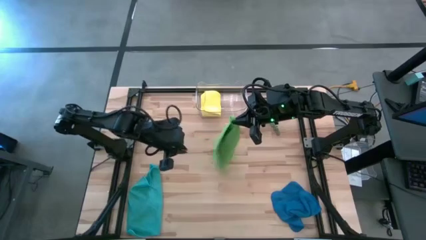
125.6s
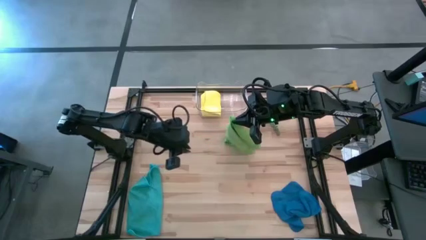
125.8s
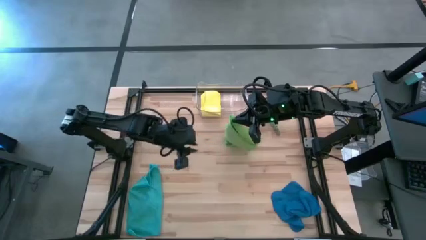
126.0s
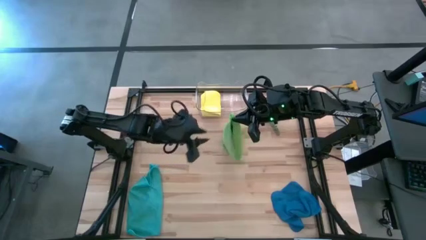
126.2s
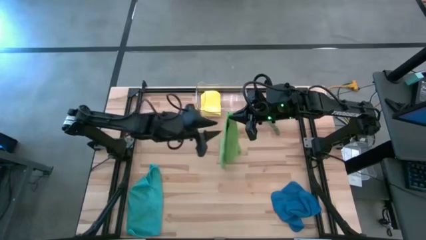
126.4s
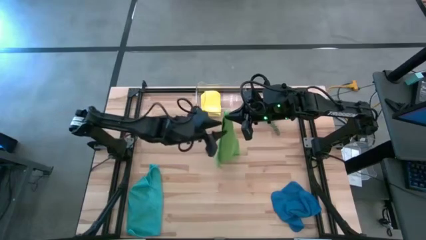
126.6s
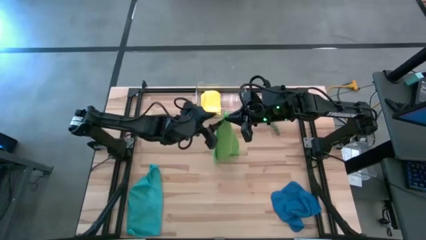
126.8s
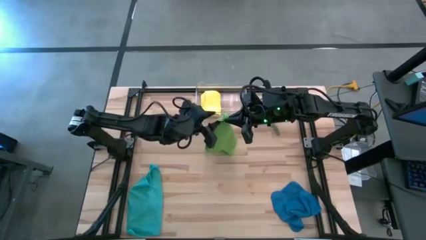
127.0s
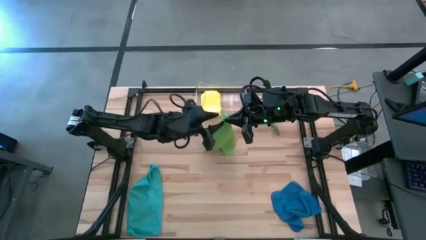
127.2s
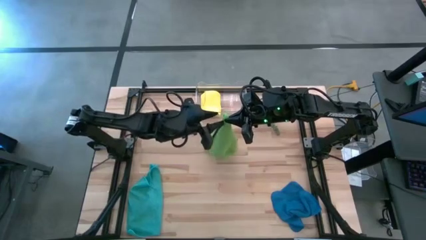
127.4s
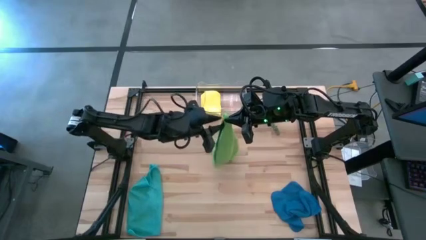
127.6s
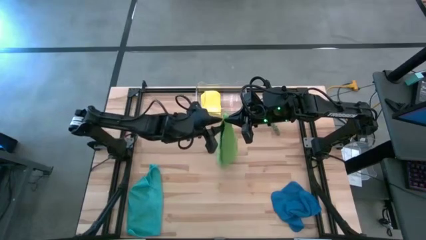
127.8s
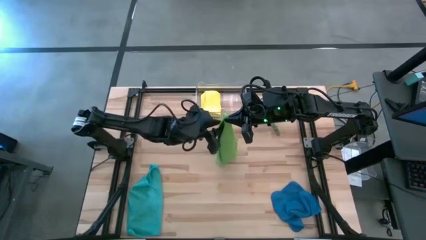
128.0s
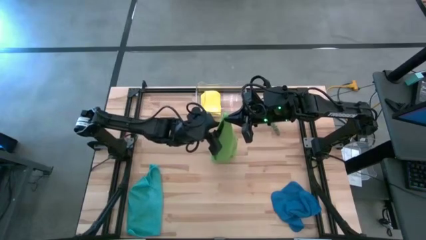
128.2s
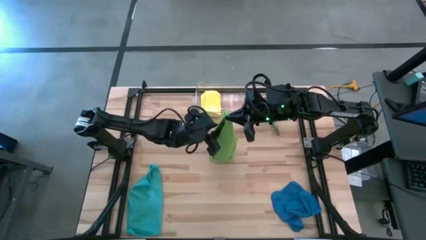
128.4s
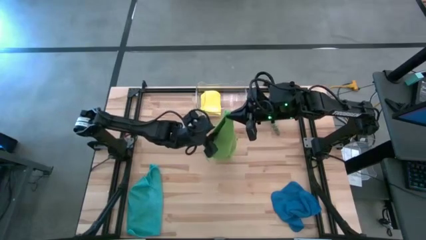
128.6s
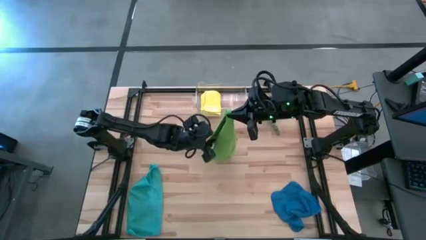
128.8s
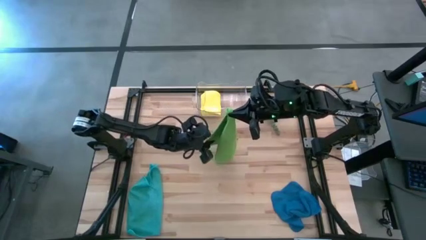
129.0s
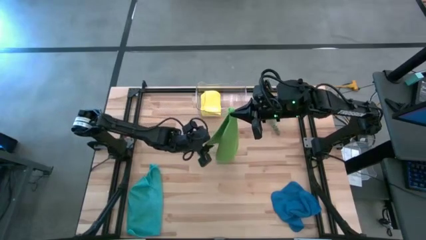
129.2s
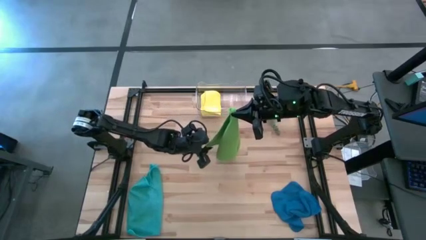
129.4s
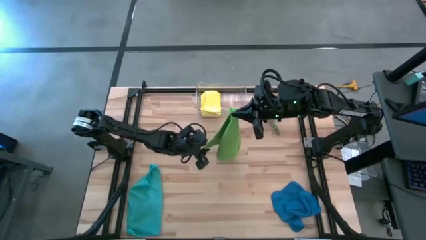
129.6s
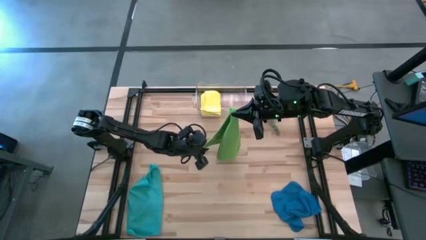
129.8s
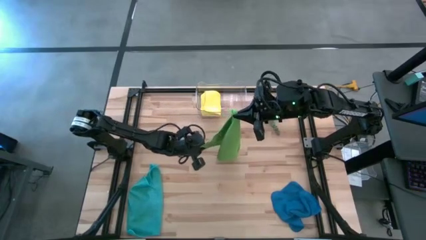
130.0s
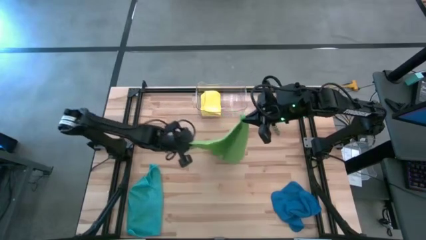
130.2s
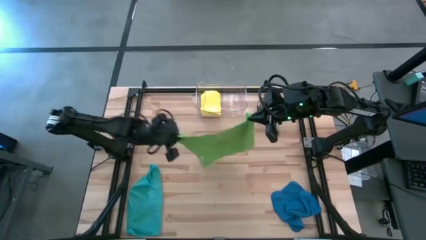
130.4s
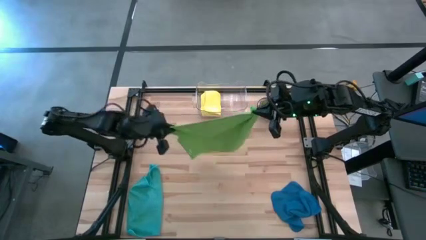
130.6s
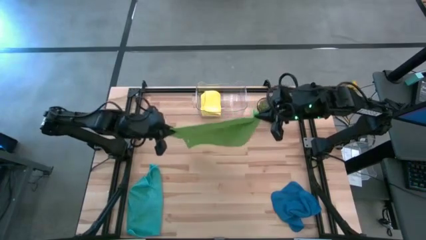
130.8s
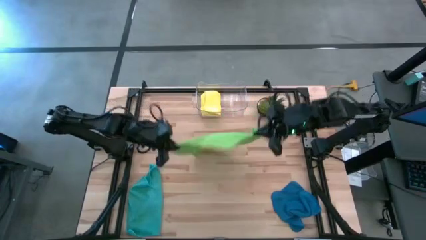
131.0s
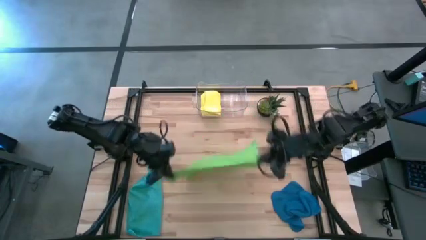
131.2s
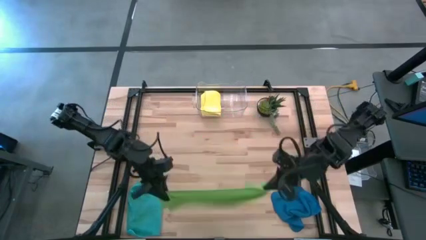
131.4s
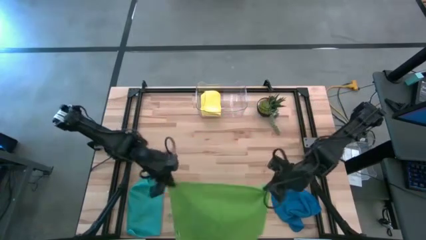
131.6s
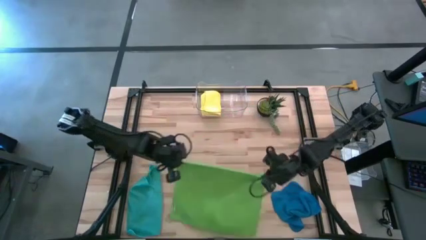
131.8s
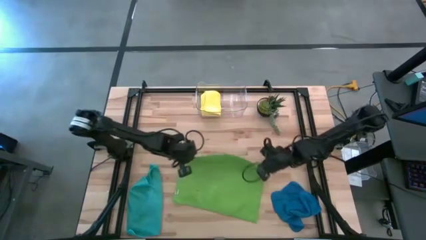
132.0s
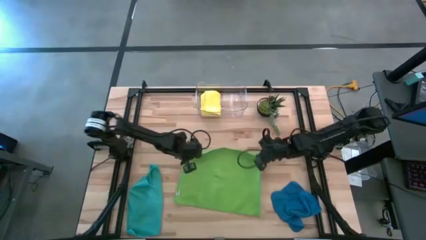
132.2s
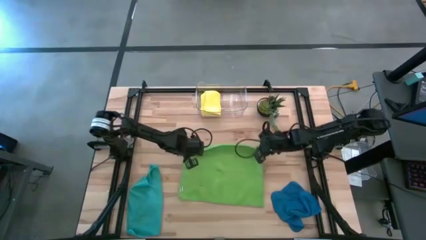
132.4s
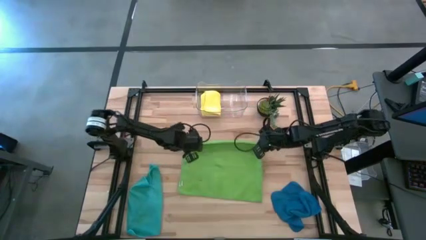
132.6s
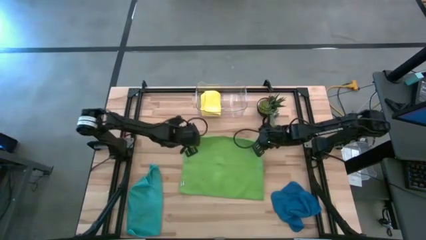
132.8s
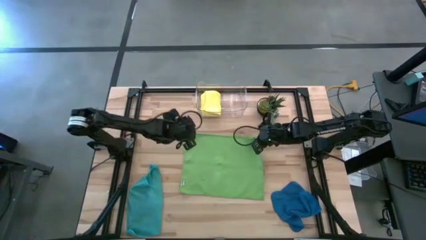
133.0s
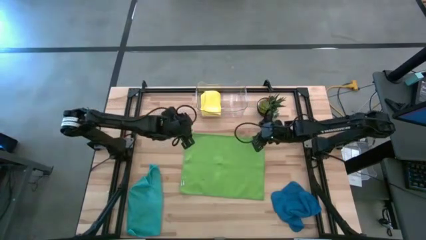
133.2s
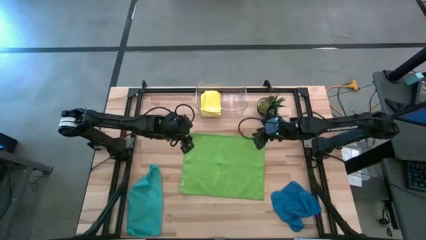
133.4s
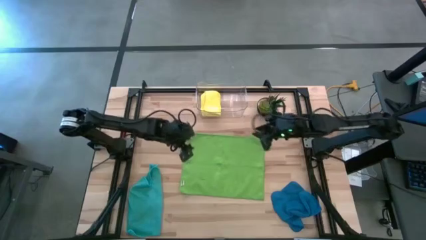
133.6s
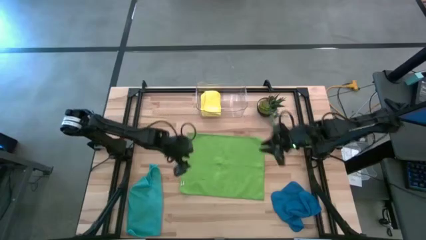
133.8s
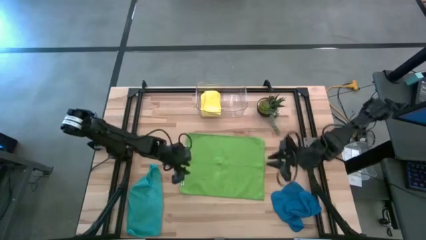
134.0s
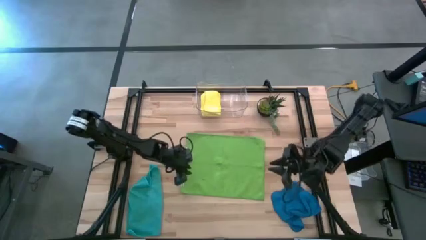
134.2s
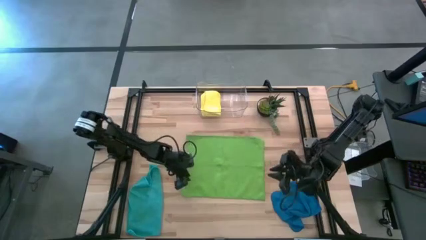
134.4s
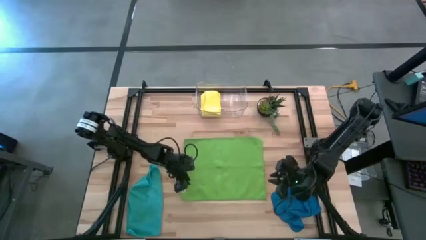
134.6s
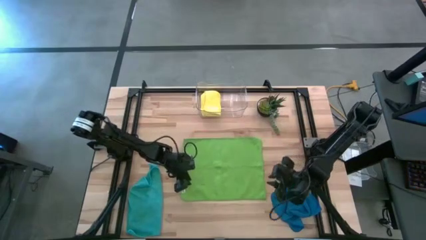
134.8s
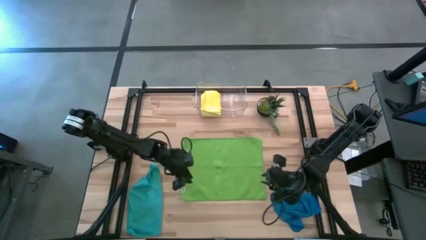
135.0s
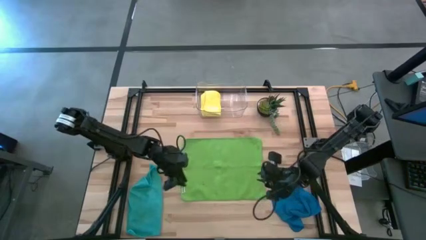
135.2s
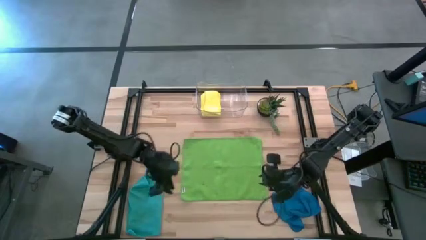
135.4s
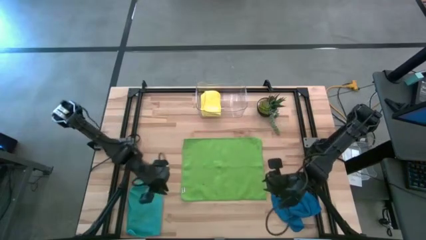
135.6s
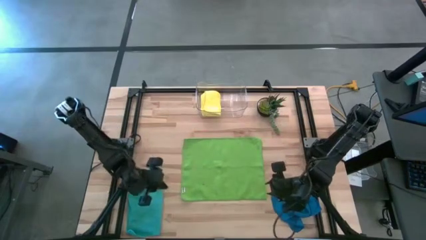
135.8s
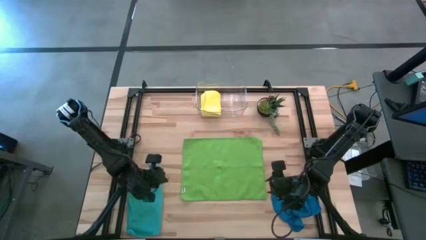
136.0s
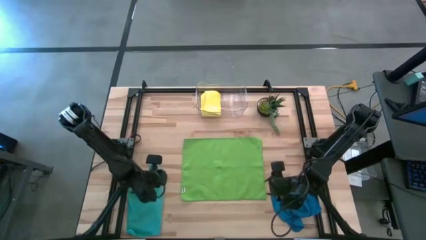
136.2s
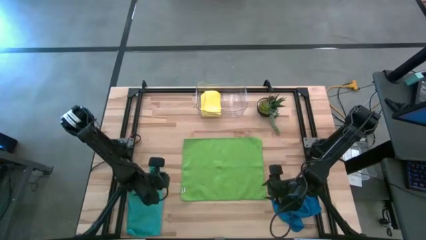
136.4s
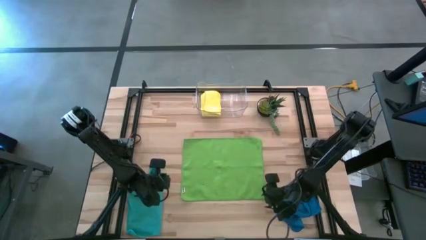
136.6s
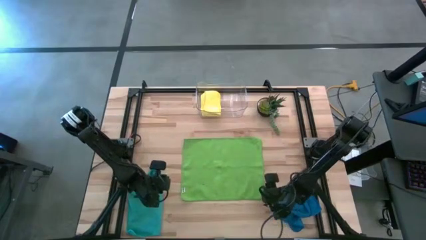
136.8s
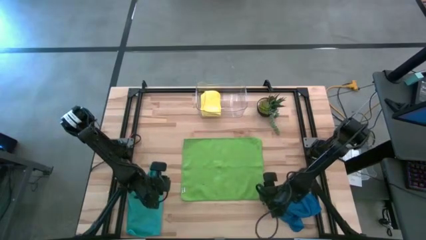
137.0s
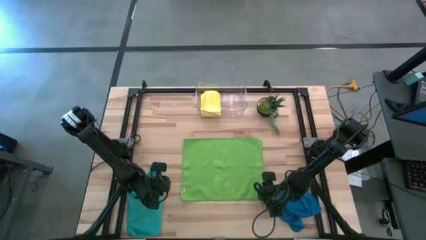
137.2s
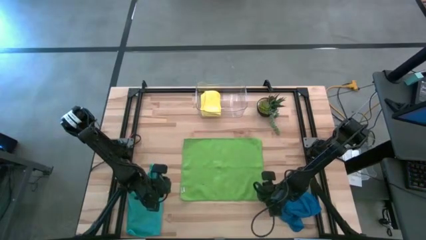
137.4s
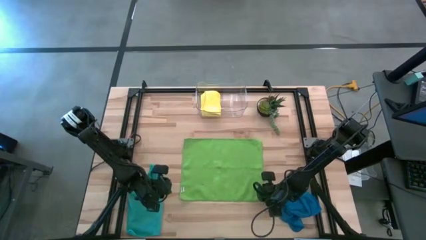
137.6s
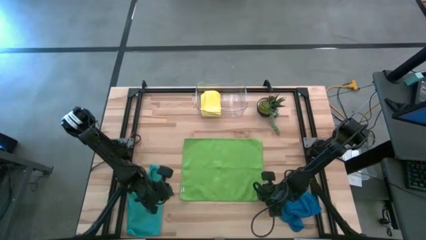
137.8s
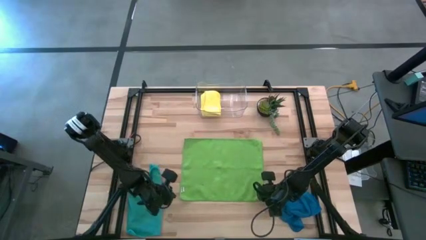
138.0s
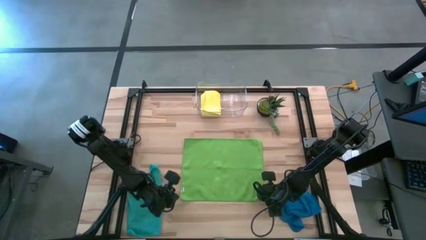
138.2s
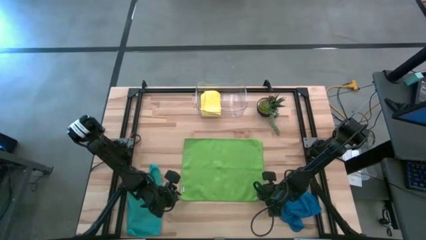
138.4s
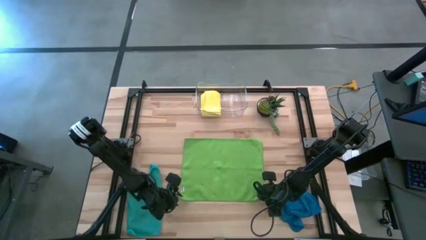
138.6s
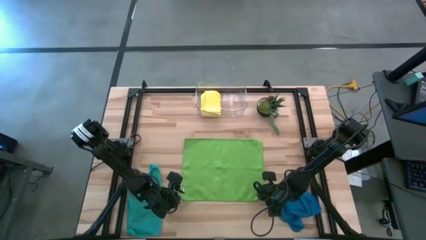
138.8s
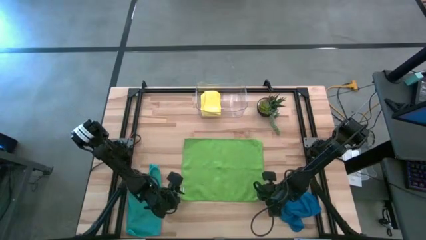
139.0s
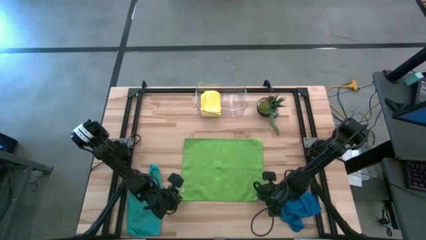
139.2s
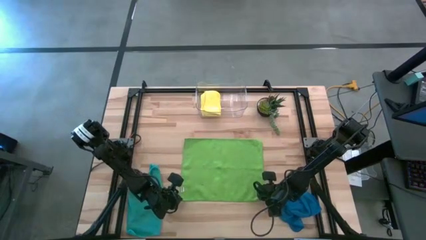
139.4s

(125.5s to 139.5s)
Task: Fold microfiber towels
Fold the green microfiber towel

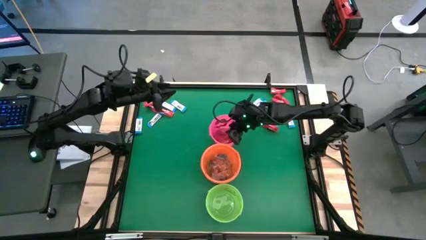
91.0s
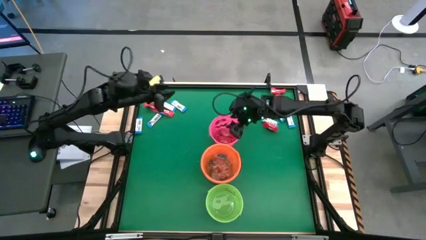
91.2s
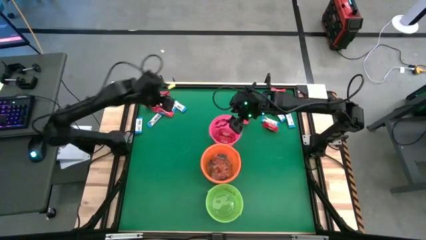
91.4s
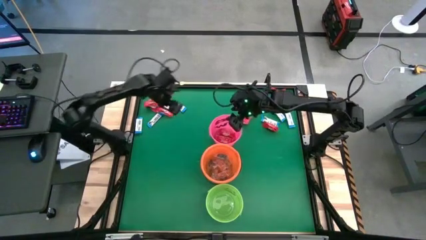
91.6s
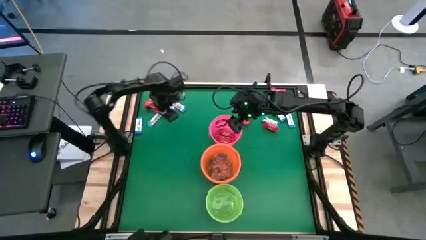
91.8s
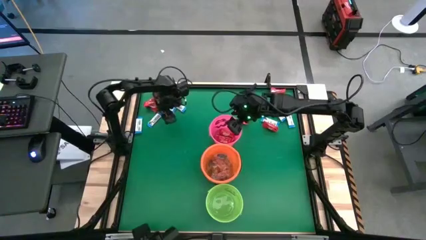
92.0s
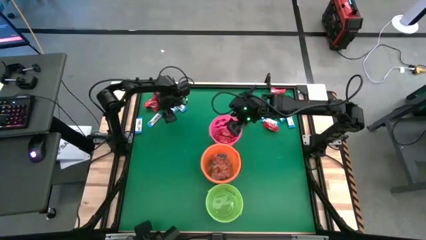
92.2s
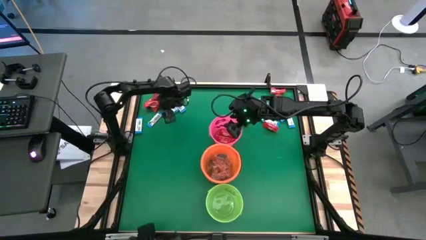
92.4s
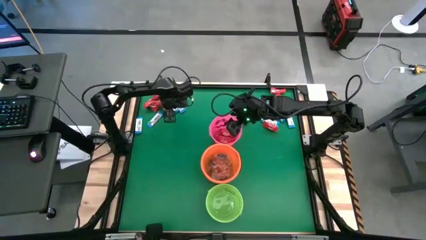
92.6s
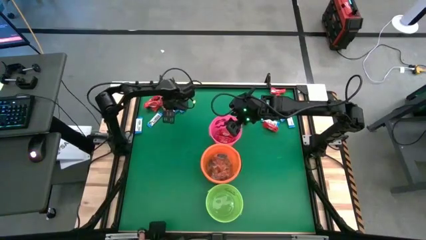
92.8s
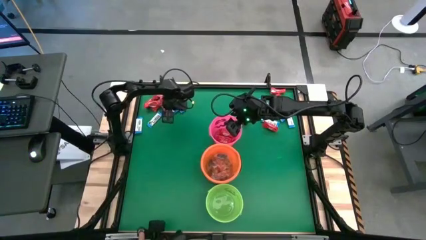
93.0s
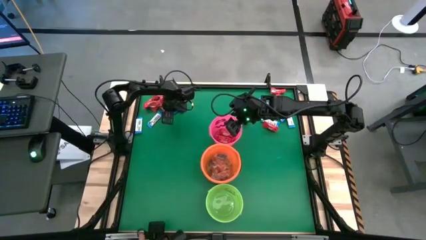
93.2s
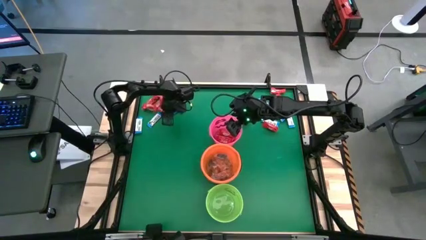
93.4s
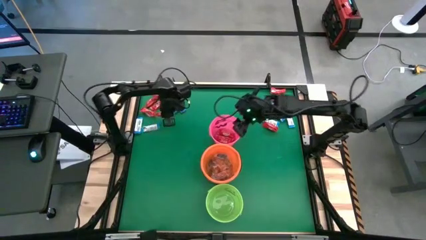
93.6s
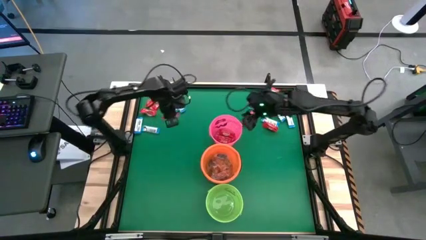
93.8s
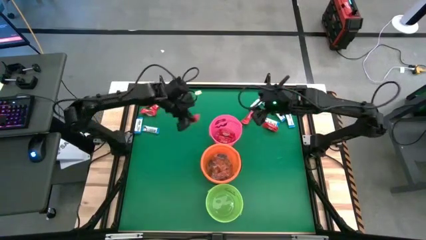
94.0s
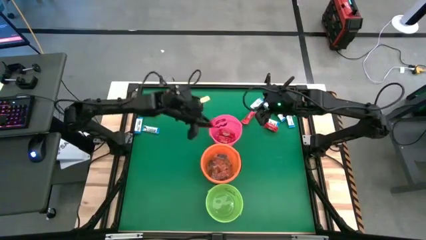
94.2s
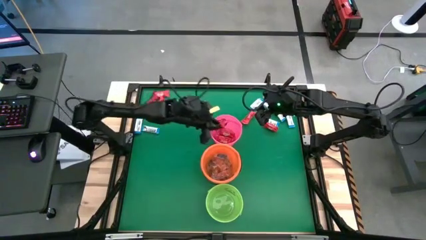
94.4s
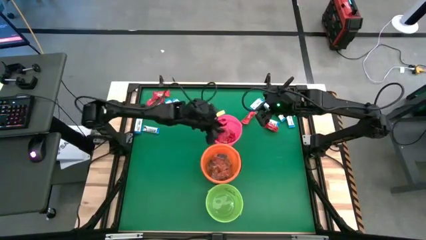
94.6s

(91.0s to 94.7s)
Task: Sort candy by brand, put in halloween buckets
Put the red chocolate into the pink bucket
